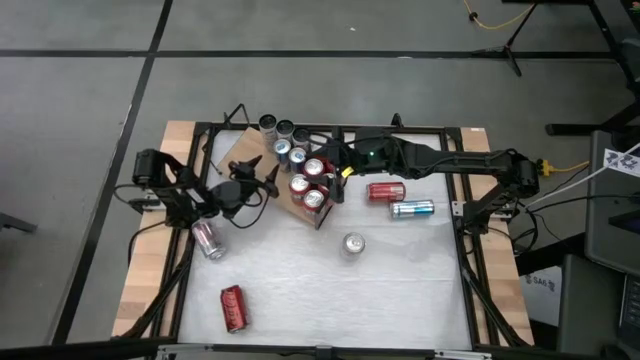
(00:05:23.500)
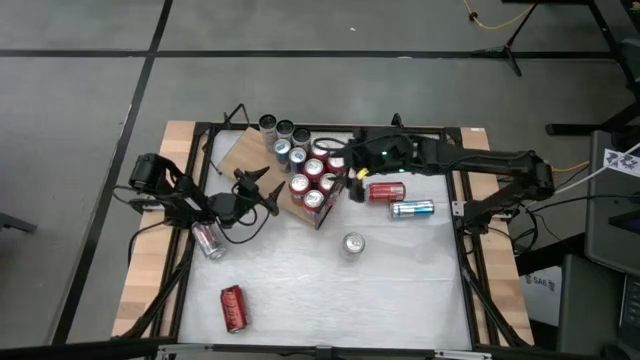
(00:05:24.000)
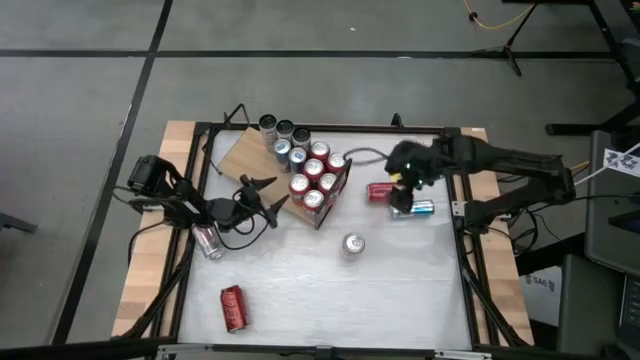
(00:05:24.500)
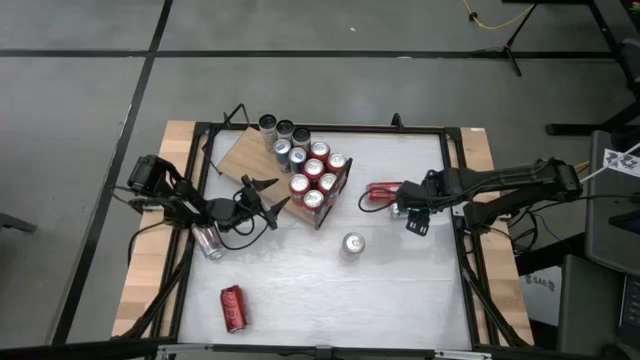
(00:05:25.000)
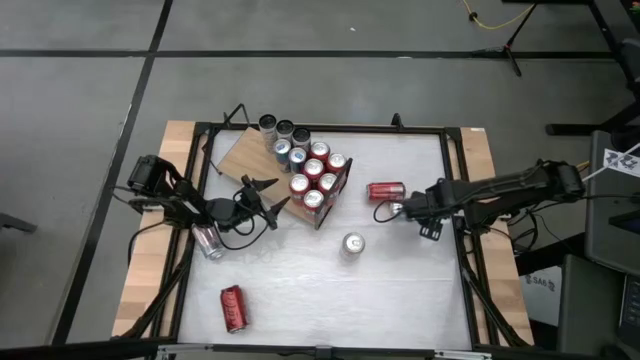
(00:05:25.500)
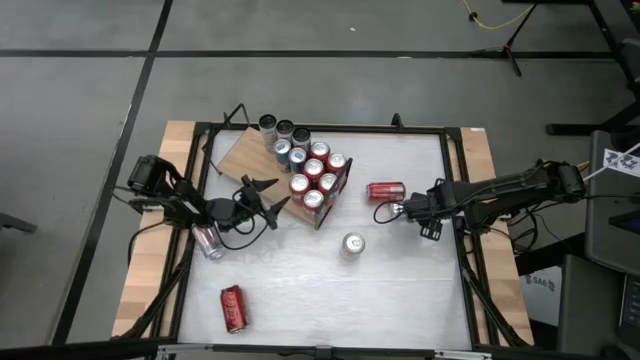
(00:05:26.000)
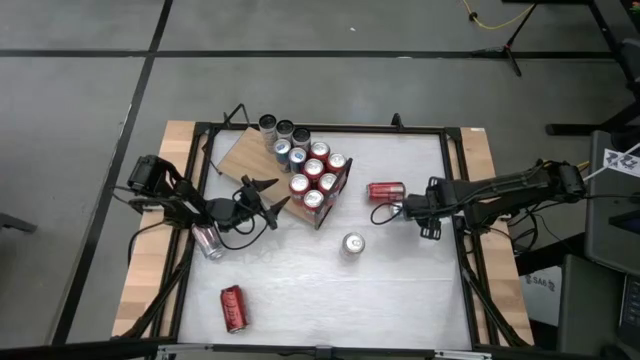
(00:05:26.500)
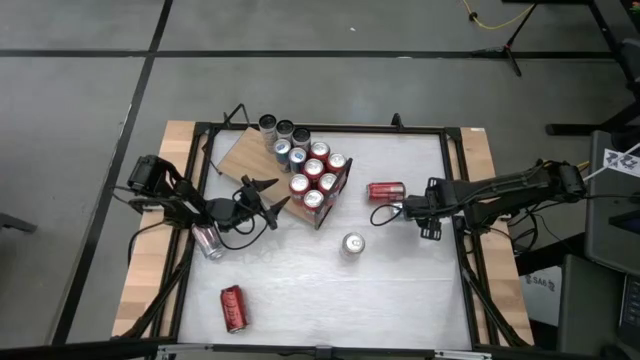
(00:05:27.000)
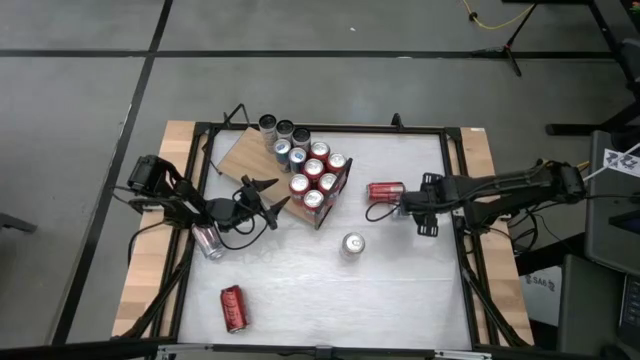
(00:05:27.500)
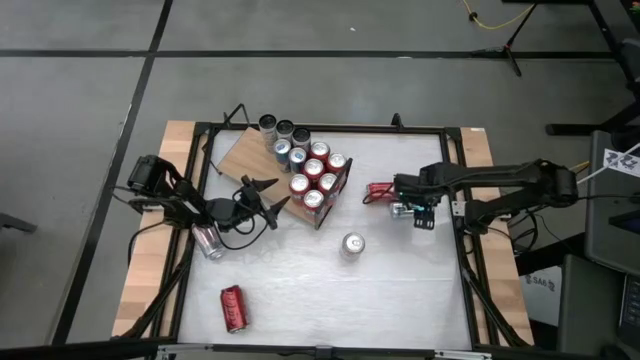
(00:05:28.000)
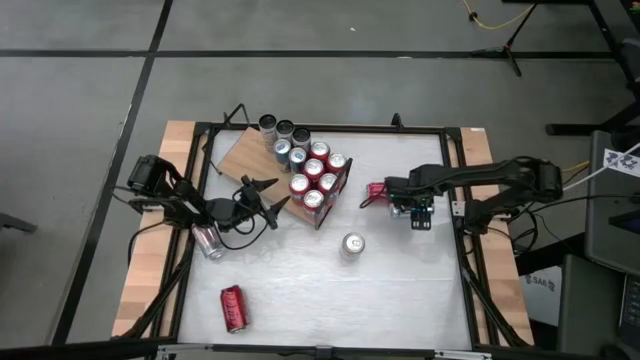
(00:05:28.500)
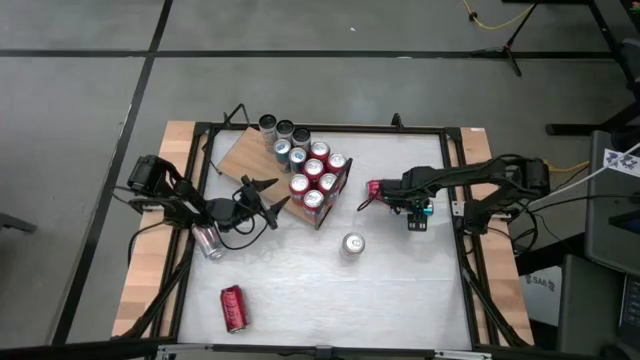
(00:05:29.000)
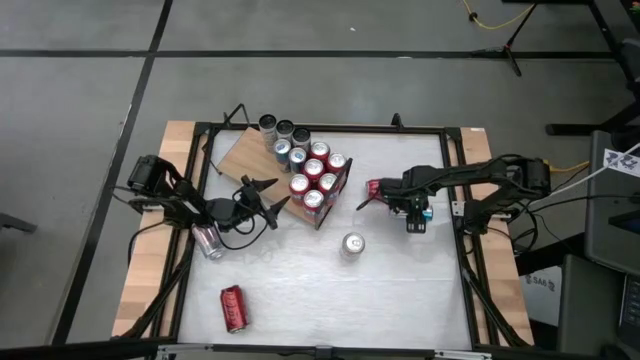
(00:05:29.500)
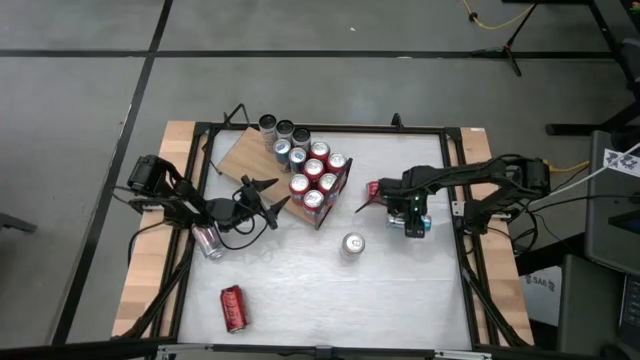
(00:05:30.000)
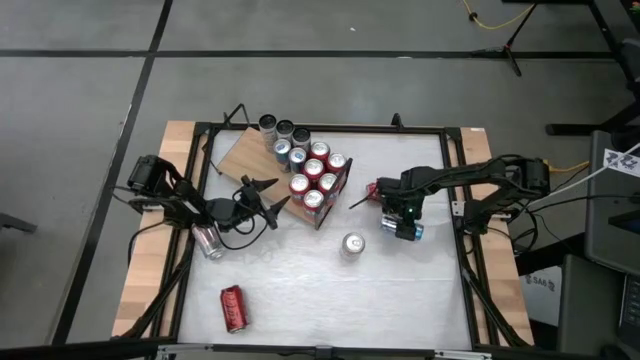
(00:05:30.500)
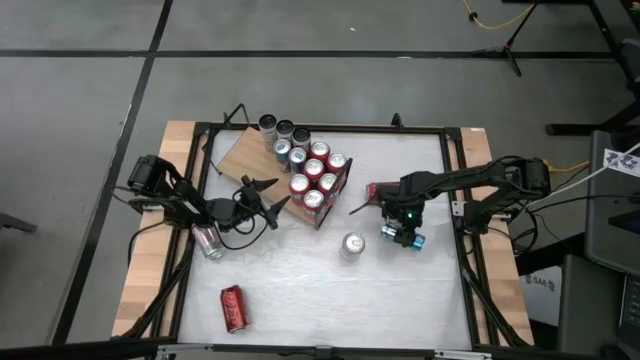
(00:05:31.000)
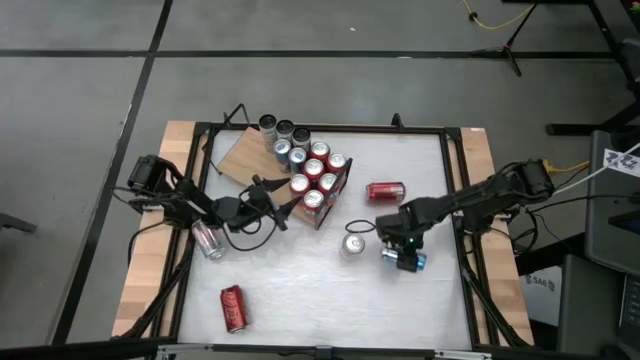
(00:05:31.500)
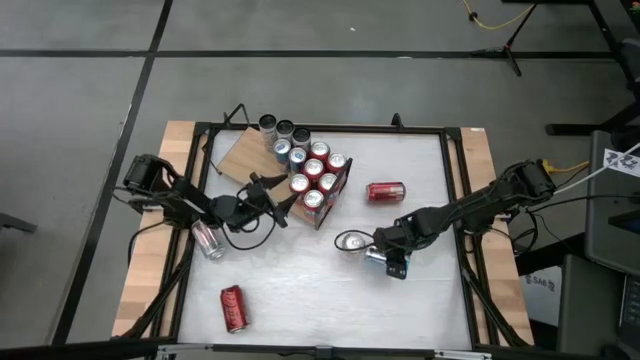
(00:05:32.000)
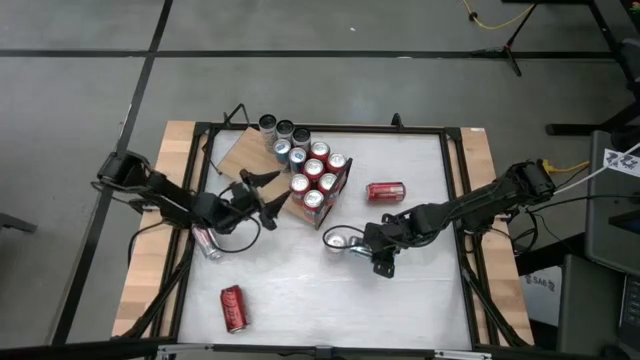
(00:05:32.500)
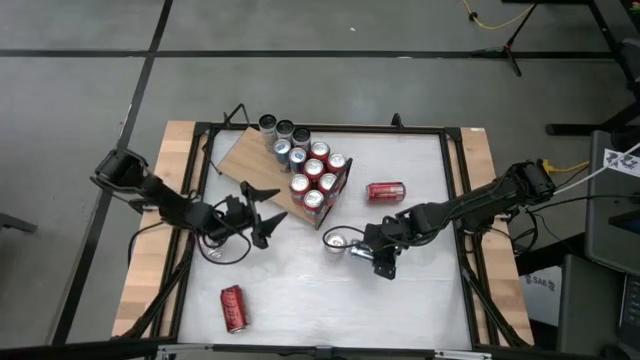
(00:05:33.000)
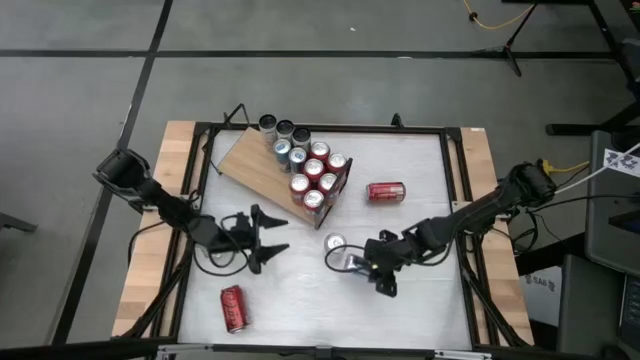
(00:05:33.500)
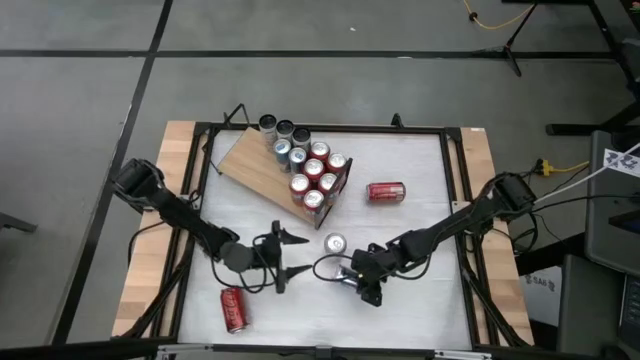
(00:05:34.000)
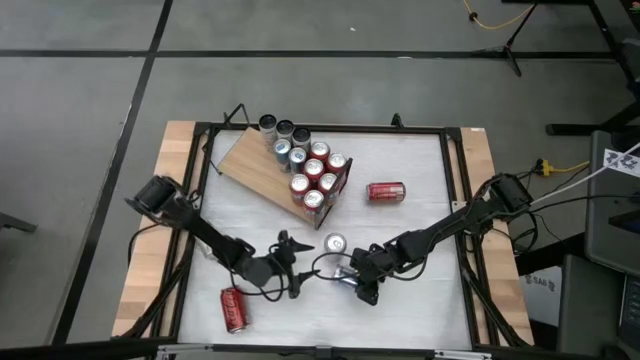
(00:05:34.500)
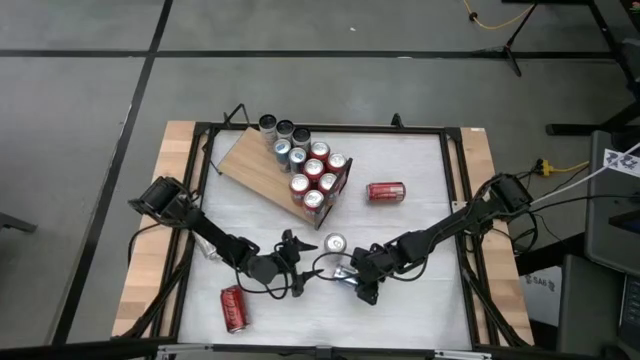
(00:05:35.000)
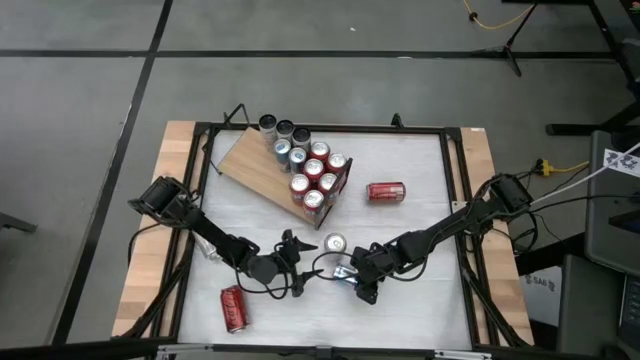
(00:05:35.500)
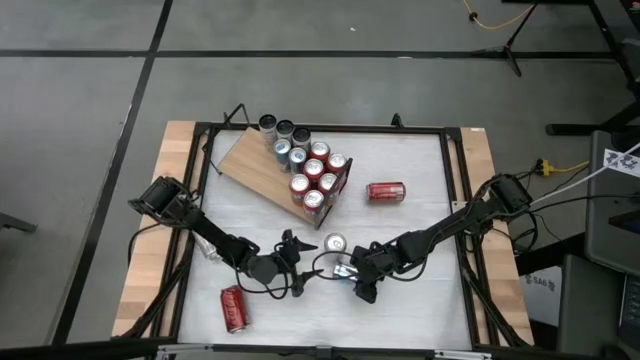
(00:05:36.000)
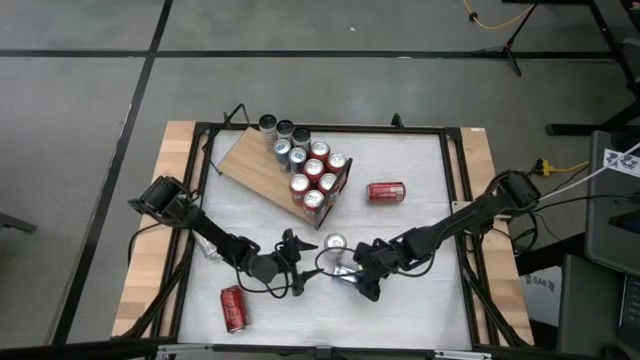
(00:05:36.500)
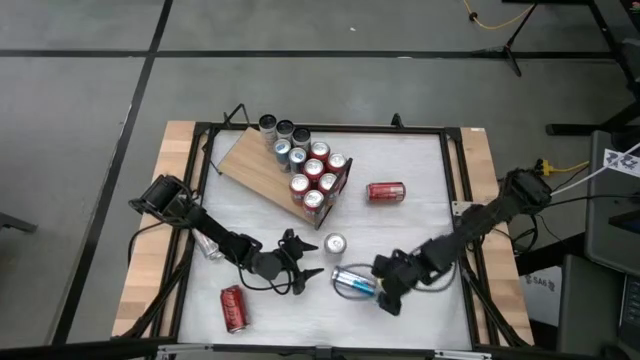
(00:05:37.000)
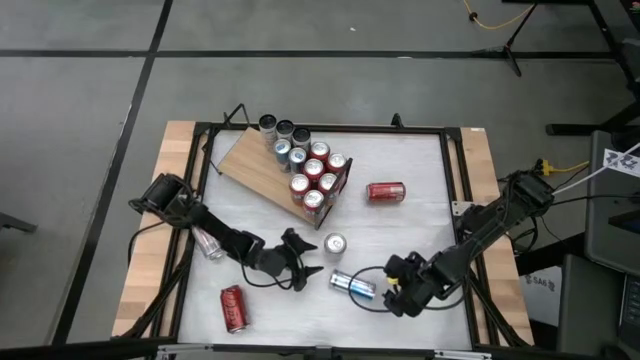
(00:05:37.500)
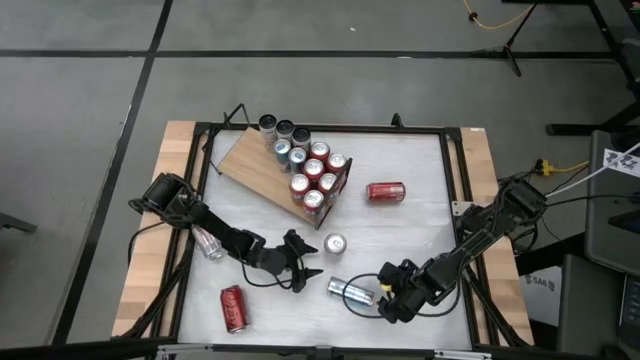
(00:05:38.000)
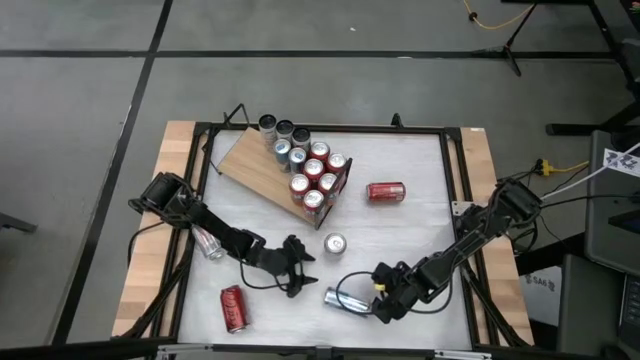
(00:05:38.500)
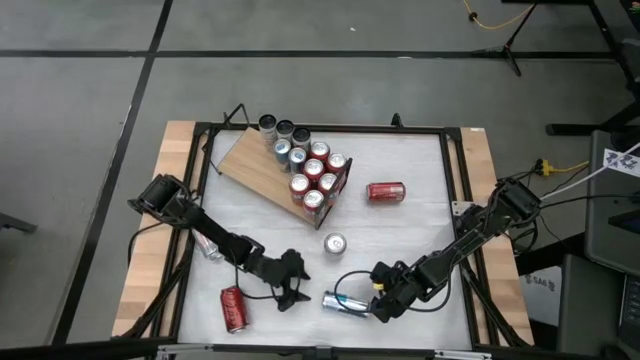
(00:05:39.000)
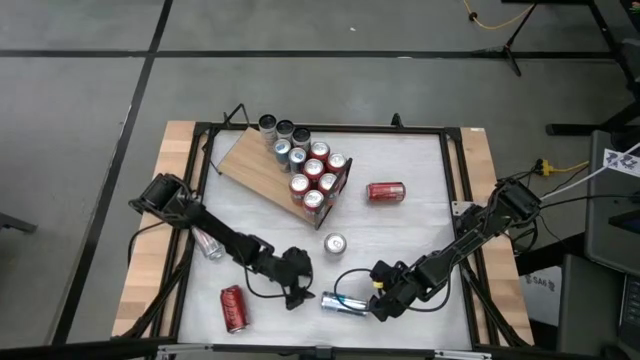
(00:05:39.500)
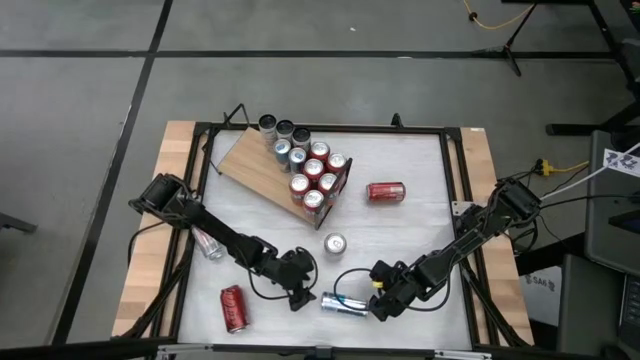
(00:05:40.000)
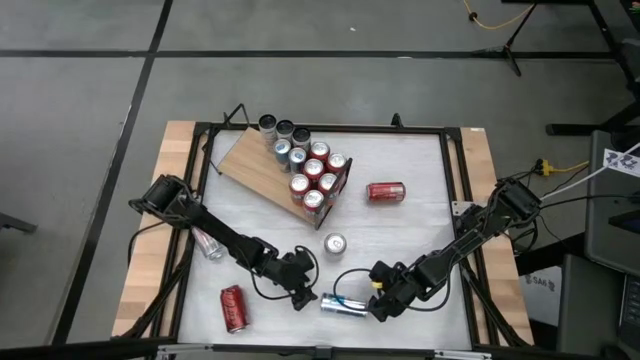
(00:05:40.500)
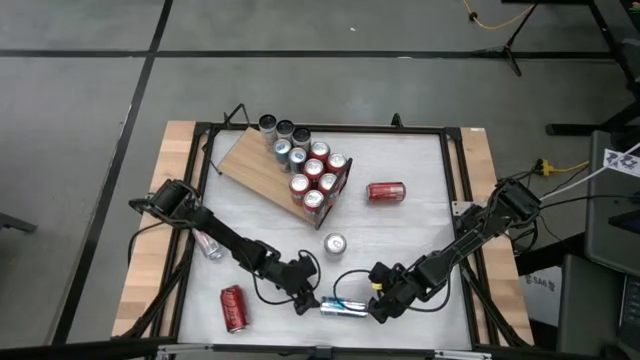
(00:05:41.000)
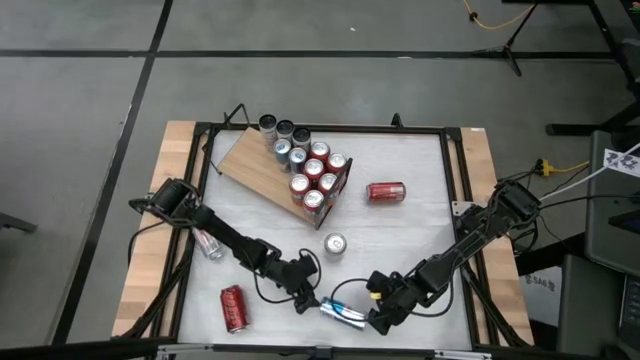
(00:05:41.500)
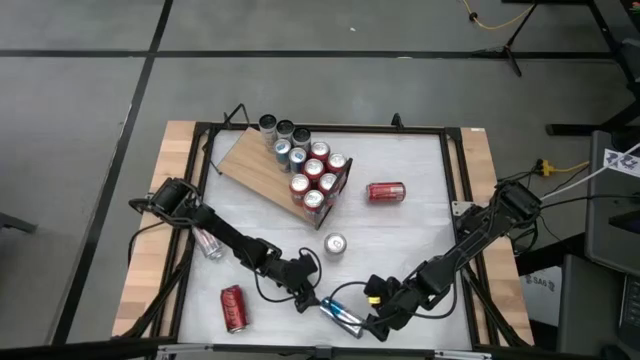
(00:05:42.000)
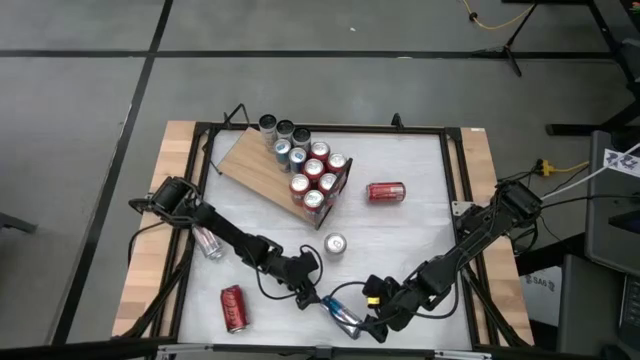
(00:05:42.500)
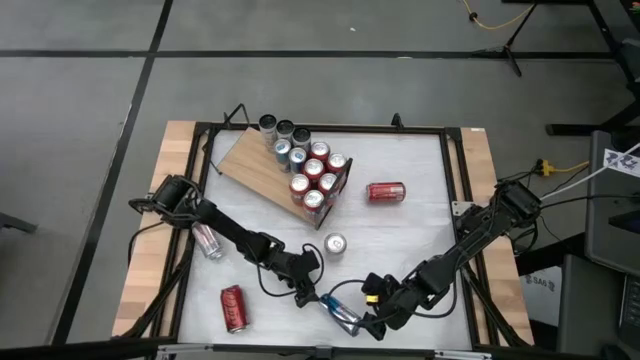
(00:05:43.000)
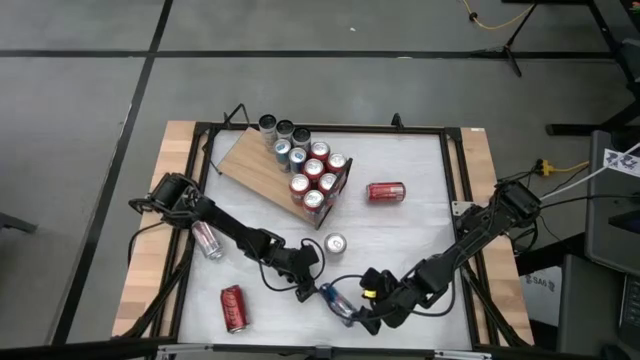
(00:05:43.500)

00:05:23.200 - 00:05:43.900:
Task: Pick and place cans onto a shelf
Put the blue and white soda can on the shelf aligned with the other blue and white soda cans

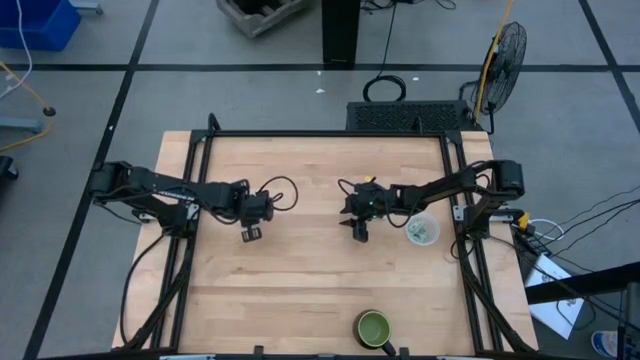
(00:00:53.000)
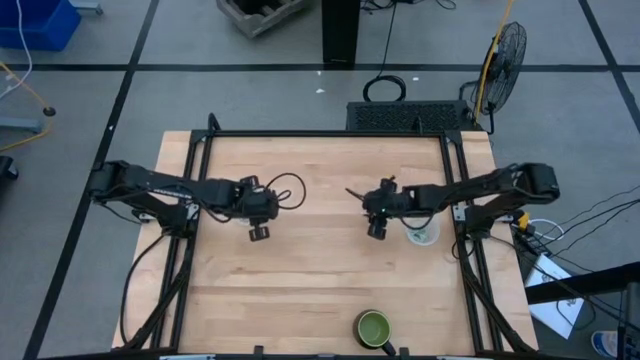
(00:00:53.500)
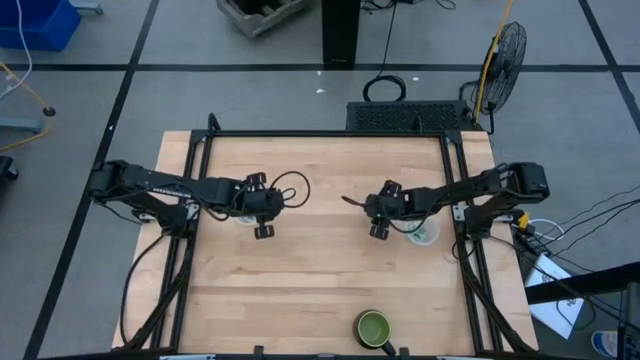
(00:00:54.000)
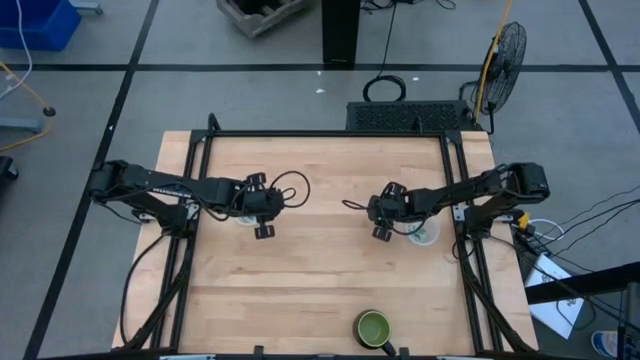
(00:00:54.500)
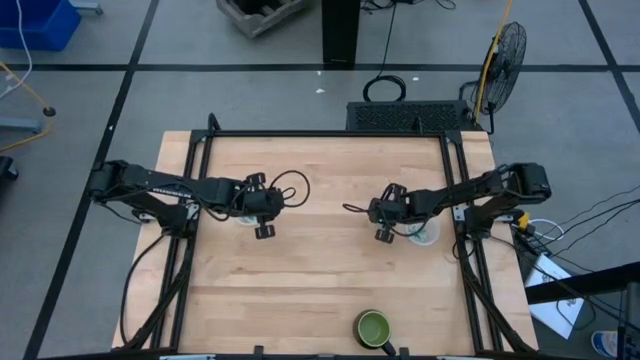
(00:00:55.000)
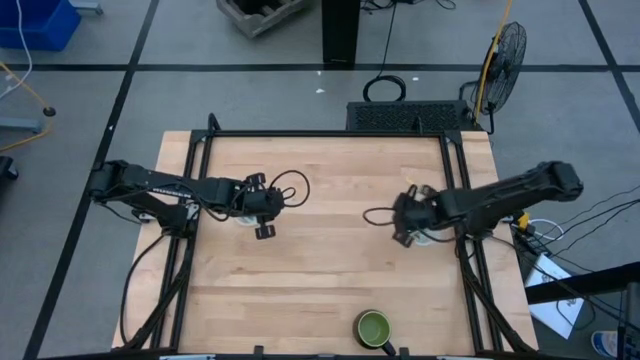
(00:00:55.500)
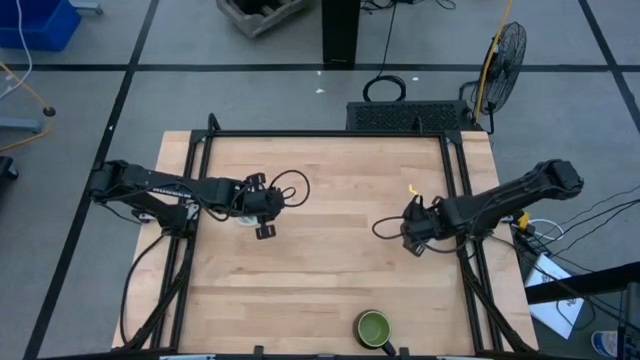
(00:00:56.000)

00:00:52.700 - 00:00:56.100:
Task: Pick and place Stevia / Truvia into bins
Put the stevia packet into the right transparent container
